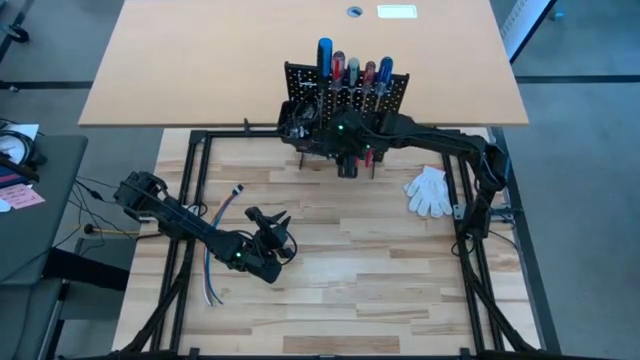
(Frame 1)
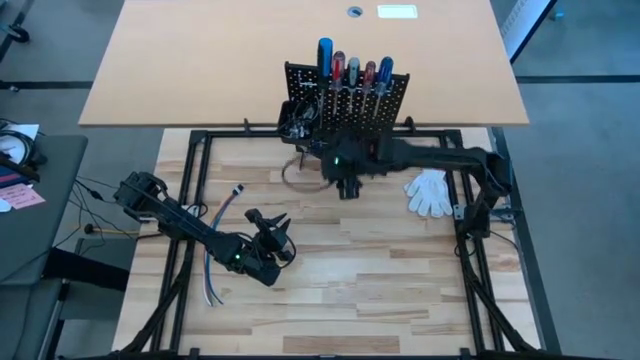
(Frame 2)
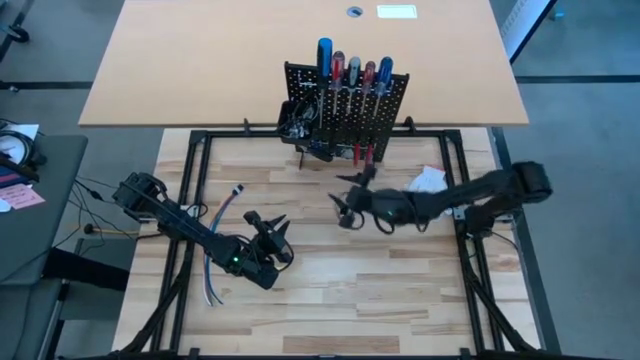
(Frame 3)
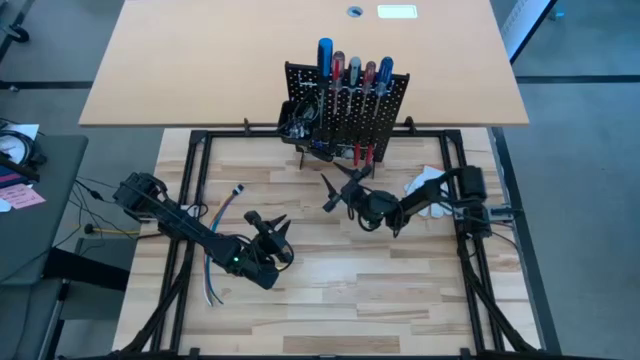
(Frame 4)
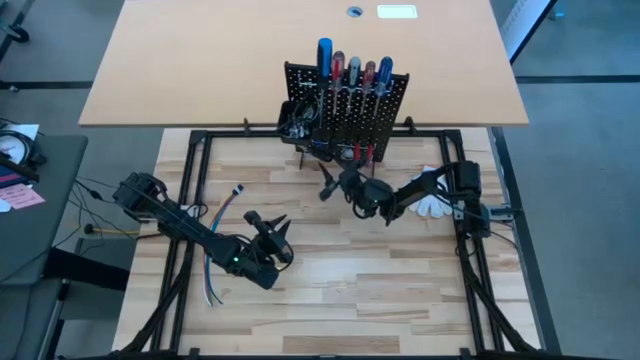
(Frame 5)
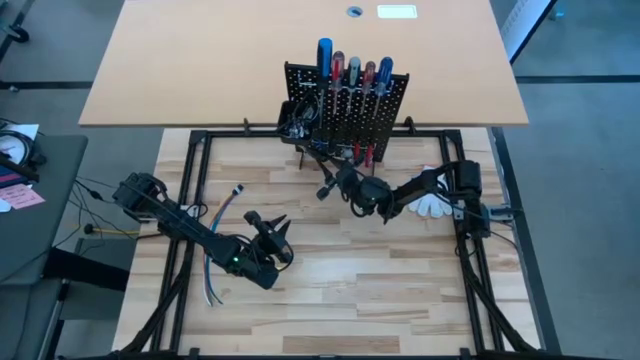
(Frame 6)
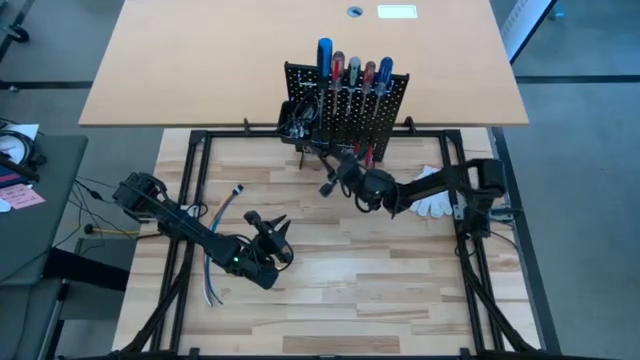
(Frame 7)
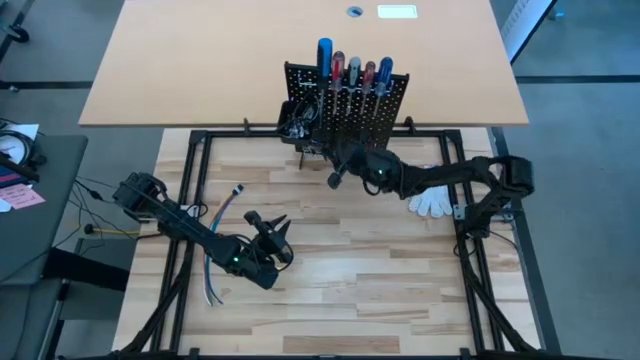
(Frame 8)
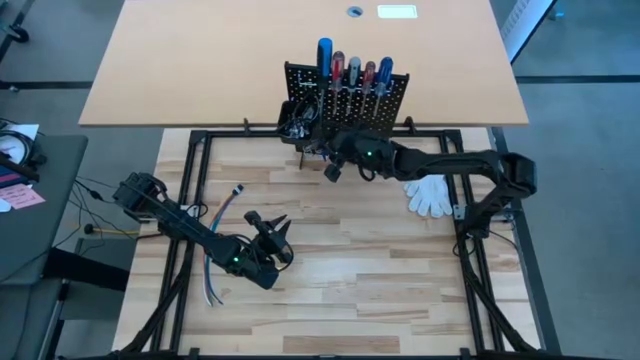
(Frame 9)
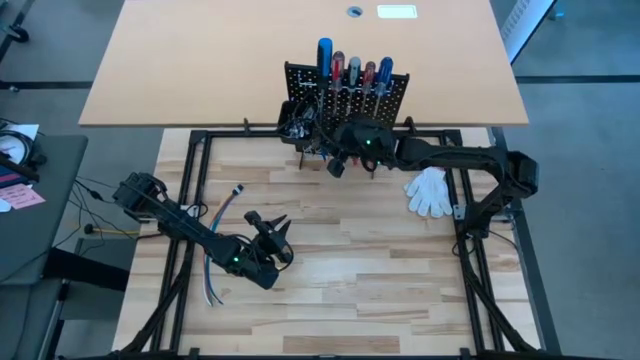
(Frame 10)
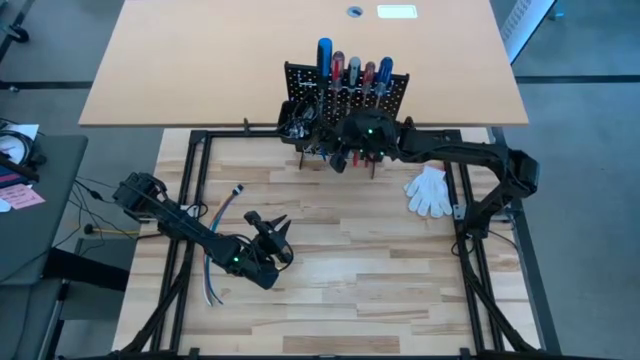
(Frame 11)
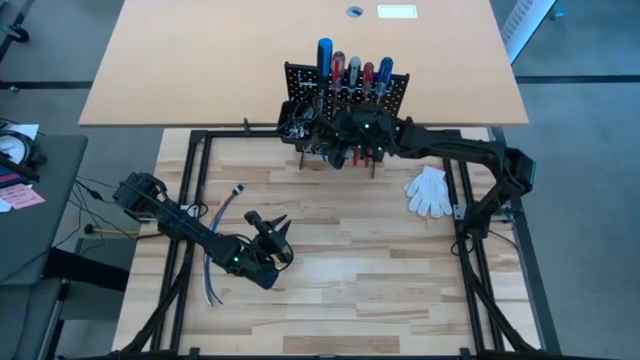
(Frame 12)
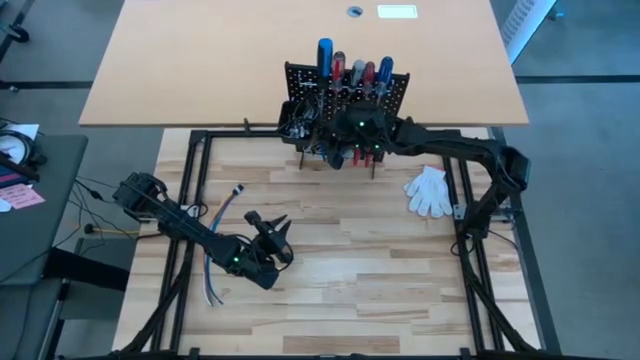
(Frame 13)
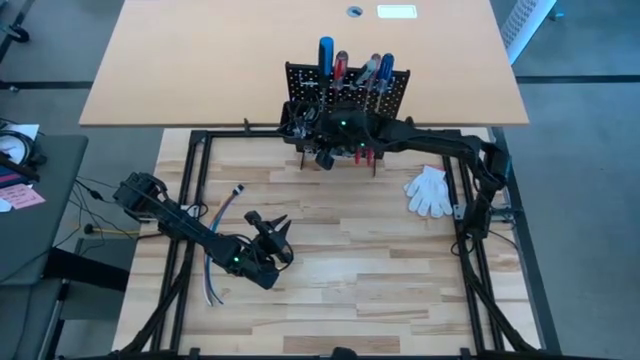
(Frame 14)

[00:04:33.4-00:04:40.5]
Task: Hang tools onto peg board
Hang the black screwdriver on the black pegboard

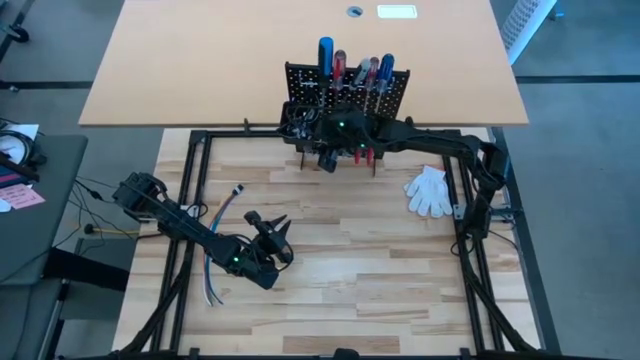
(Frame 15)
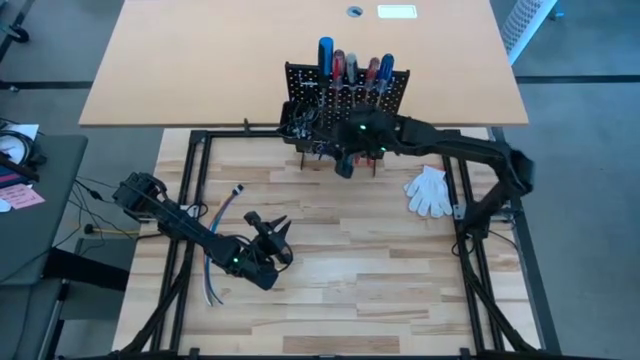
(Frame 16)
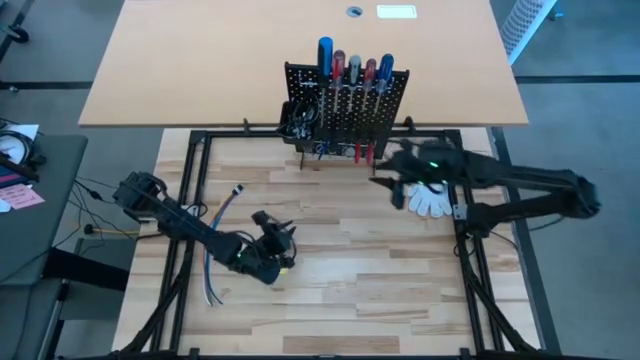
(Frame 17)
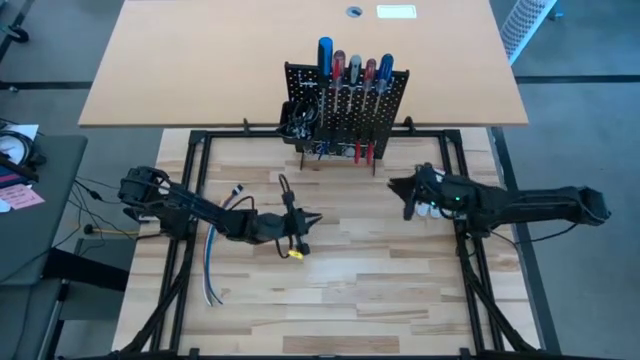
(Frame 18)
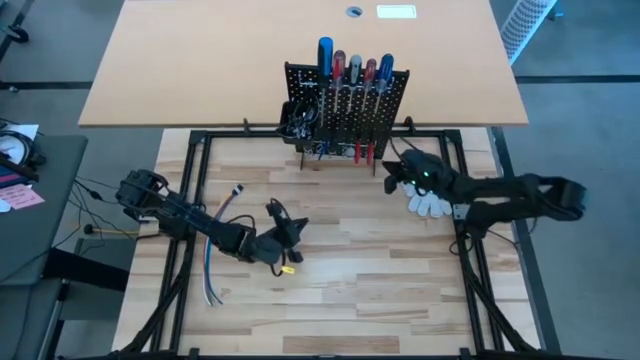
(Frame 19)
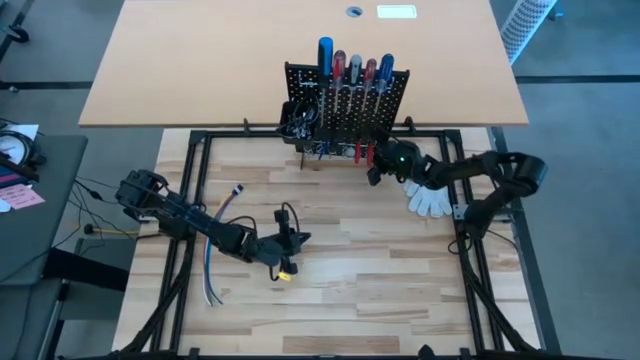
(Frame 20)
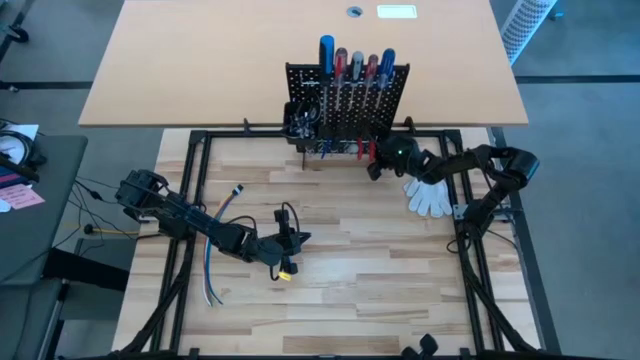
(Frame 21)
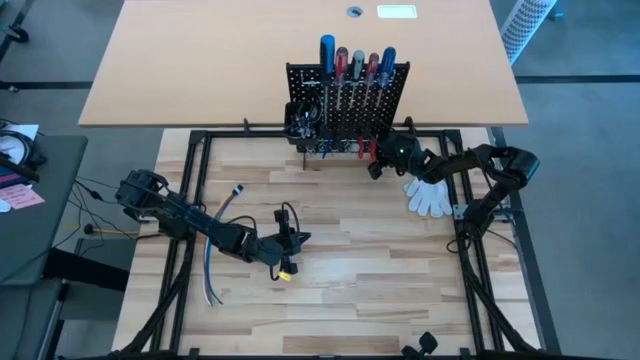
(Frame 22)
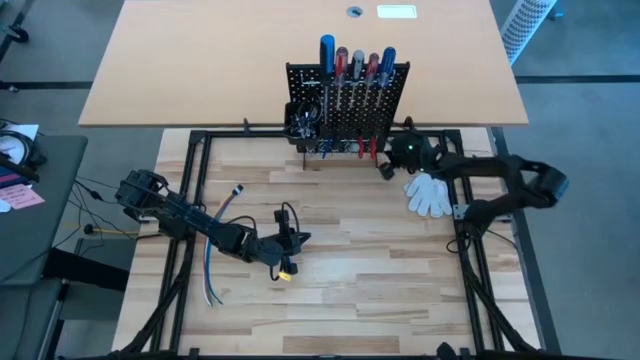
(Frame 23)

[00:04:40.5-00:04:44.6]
Adjust the black pegboard on the table

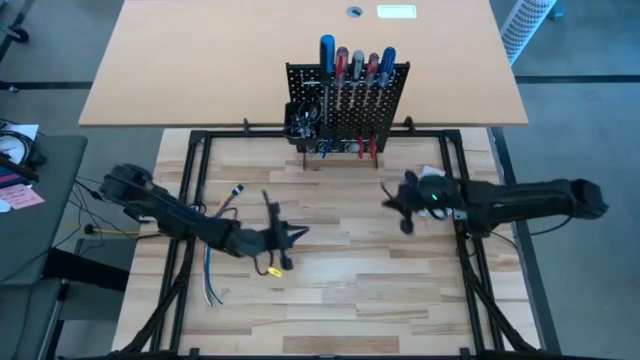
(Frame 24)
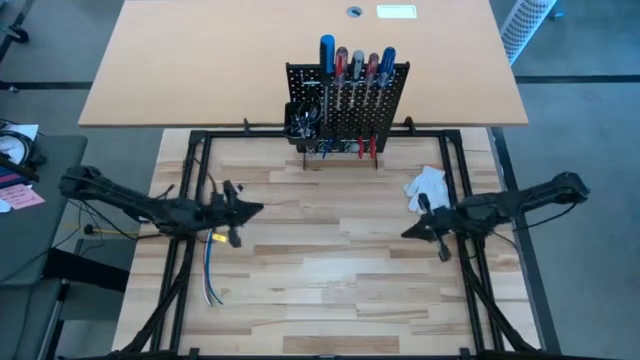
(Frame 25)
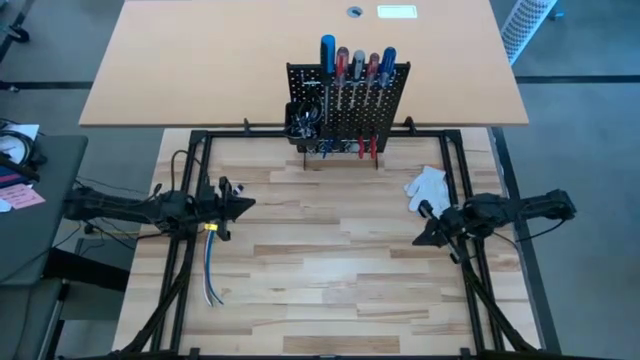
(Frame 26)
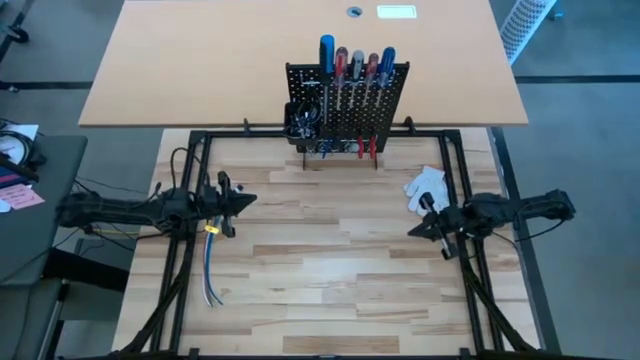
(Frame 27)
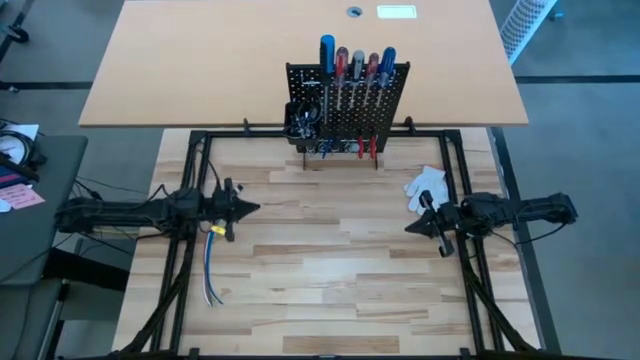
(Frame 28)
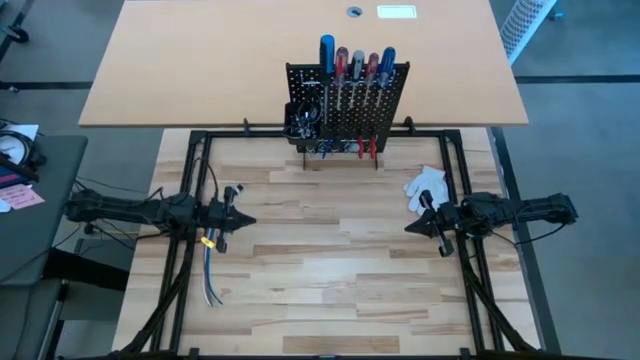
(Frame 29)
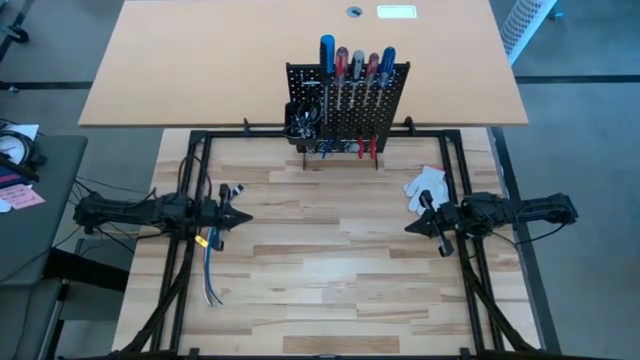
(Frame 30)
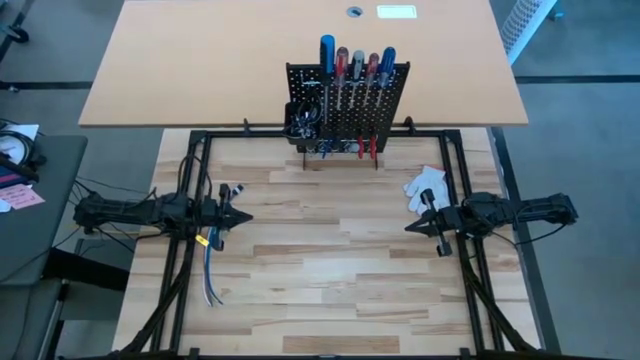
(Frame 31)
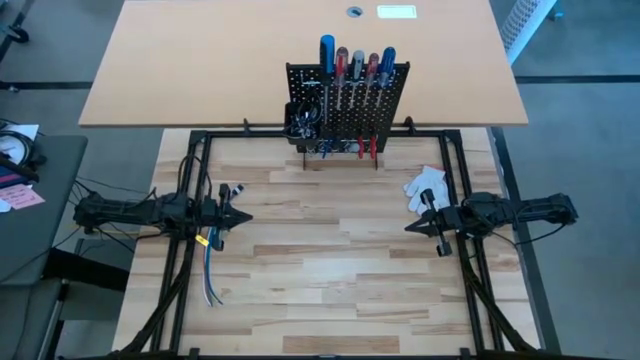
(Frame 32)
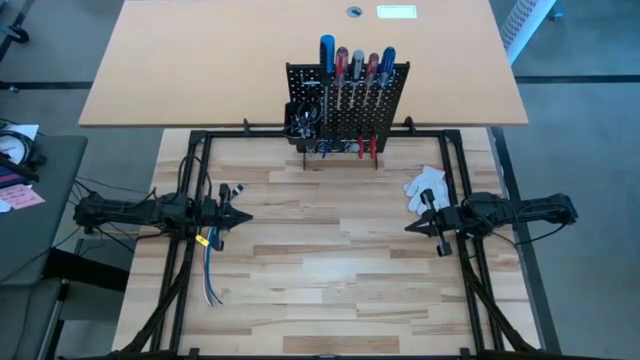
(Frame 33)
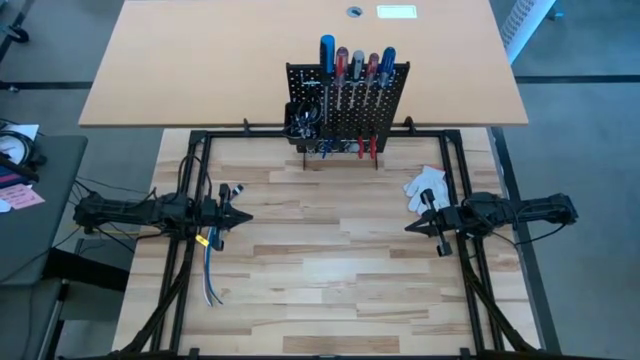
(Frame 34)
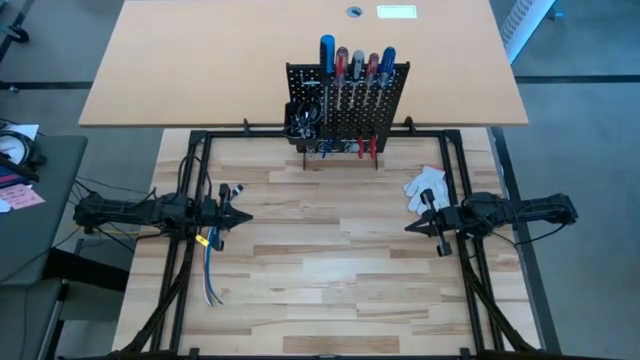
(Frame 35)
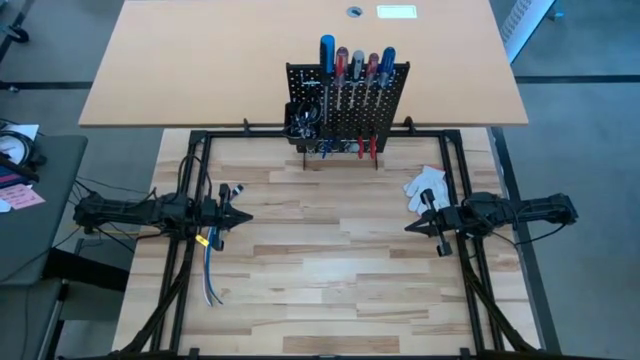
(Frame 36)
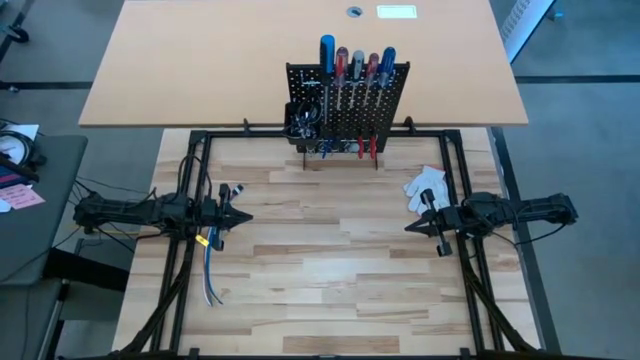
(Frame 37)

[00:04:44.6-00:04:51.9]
Return to Home Position
